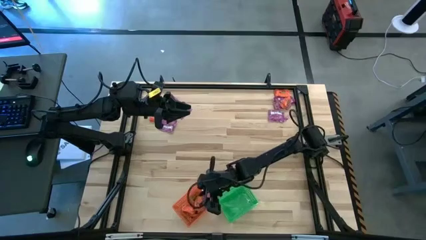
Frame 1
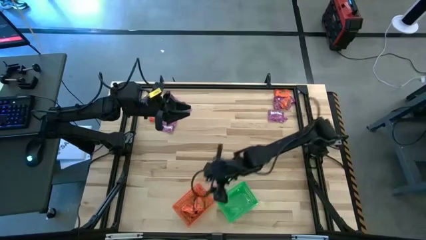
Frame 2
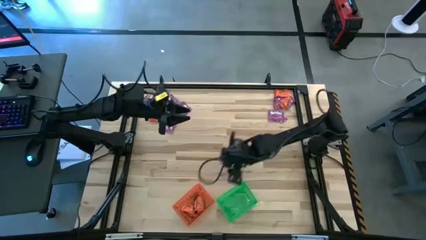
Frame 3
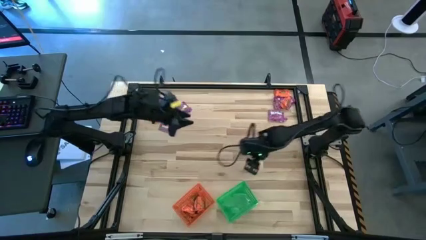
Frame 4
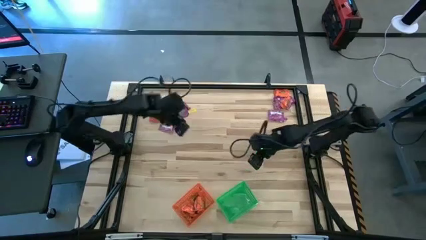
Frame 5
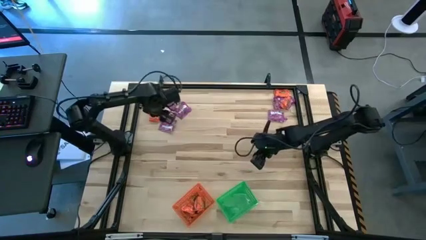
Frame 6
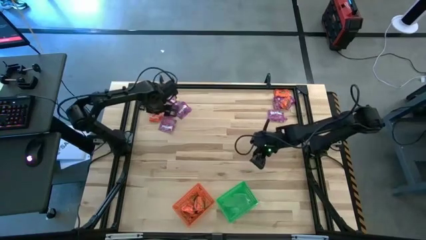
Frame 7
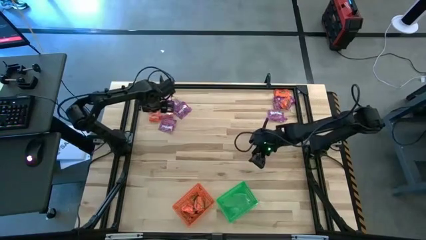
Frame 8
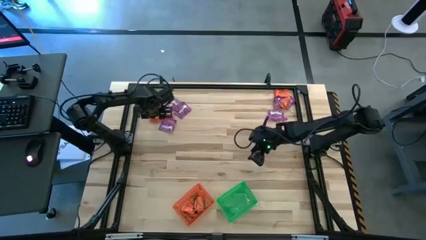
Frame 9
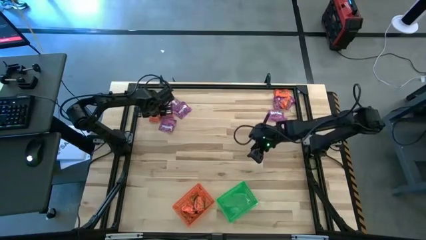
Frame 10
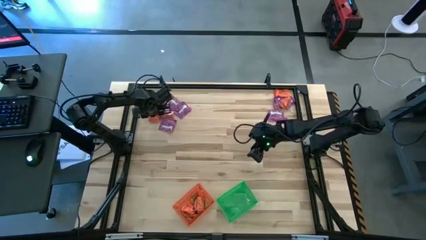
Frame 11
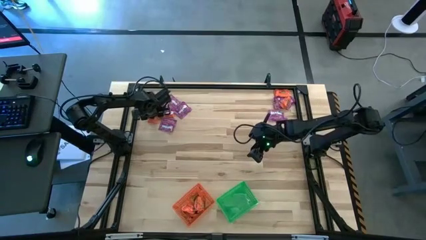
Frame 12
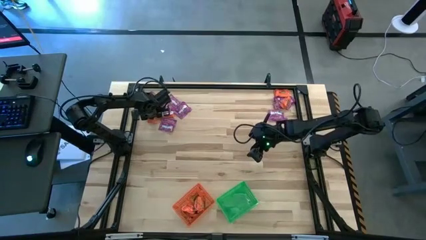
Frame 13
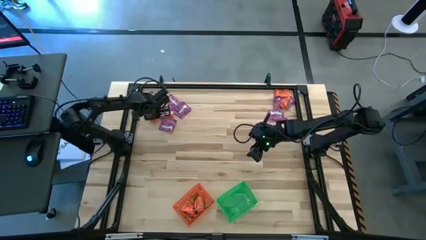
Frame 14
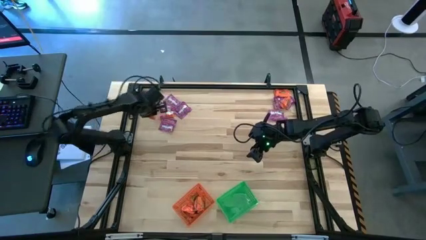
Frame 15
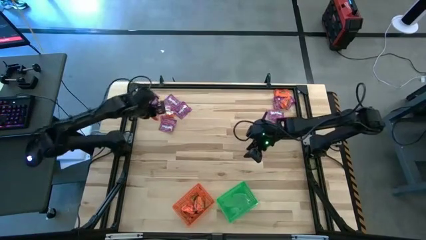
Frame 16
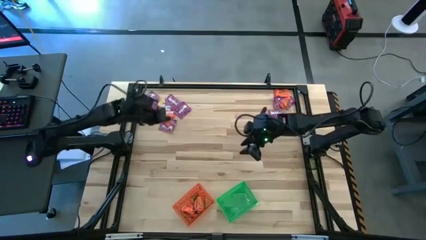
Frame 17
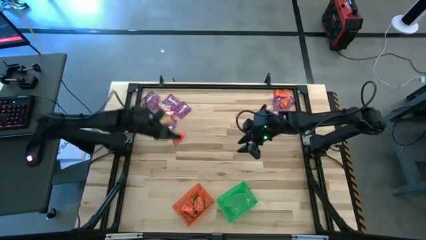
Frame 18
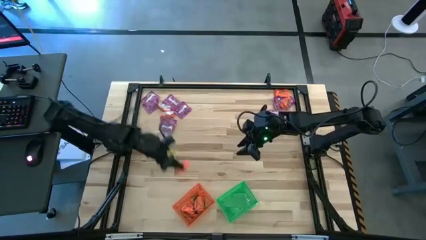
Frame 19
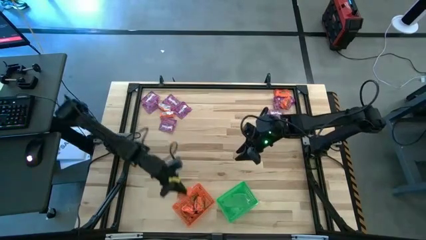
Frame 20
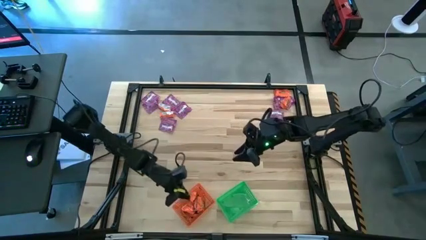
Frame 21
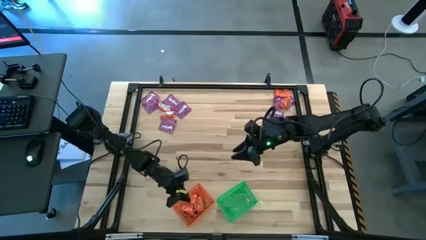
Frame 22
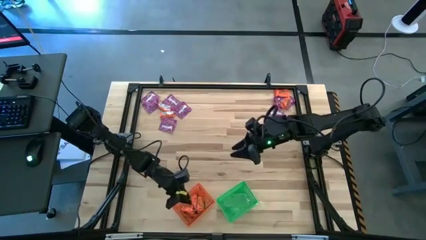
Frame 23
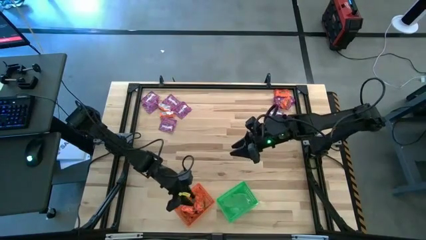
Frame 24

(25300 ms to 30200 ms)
Task: Sort candy by brand, put in halloween buckets
Put the orange candy into the orange basket

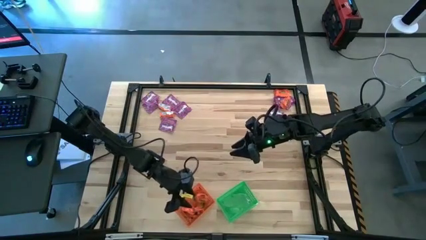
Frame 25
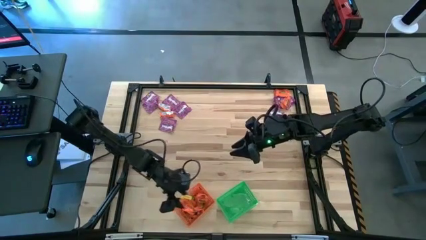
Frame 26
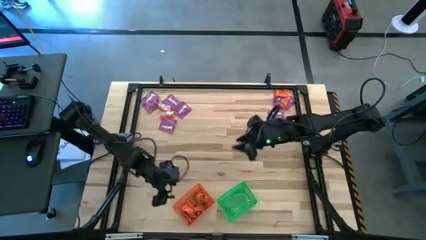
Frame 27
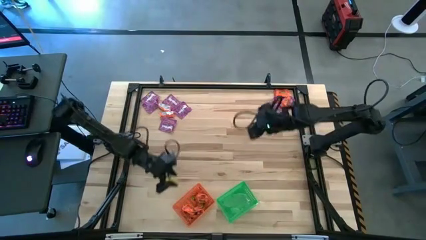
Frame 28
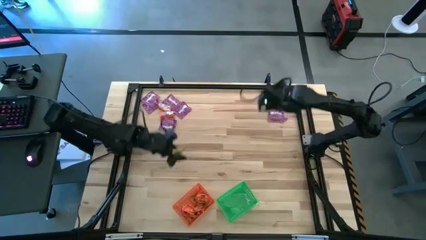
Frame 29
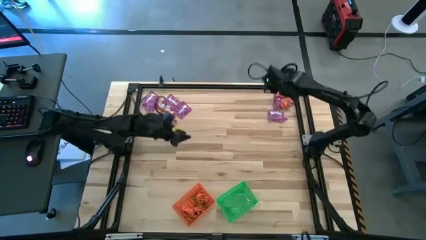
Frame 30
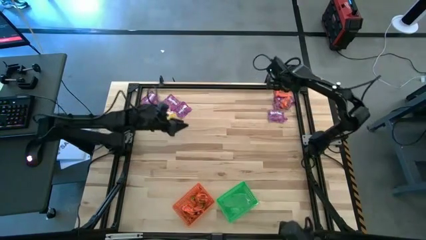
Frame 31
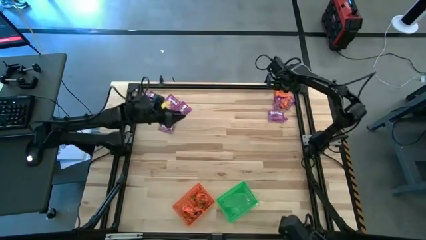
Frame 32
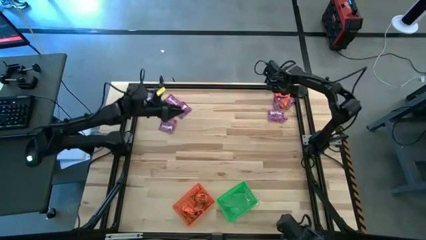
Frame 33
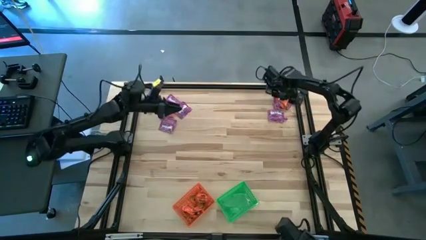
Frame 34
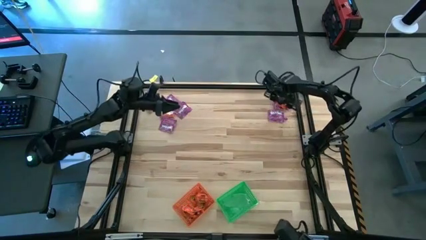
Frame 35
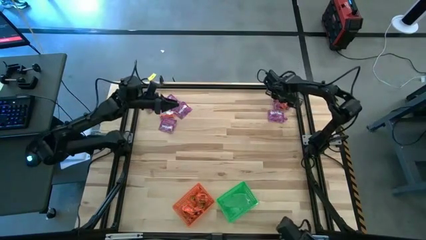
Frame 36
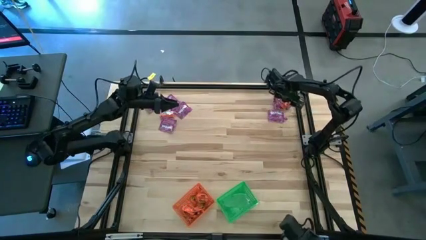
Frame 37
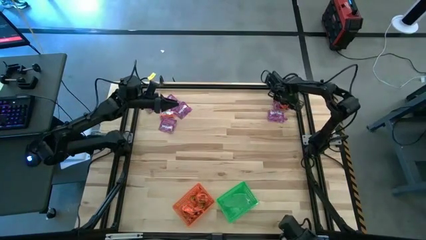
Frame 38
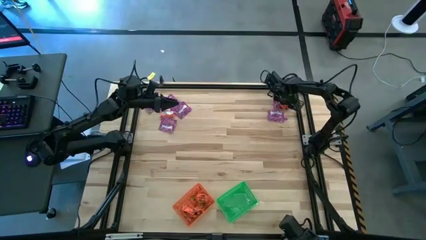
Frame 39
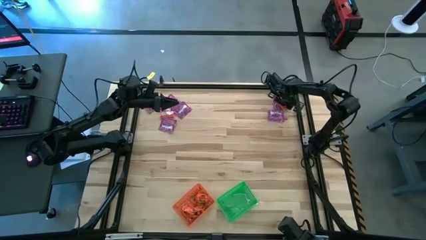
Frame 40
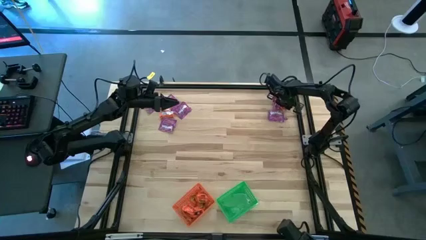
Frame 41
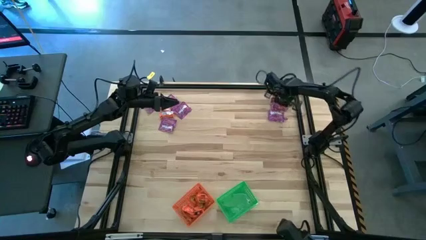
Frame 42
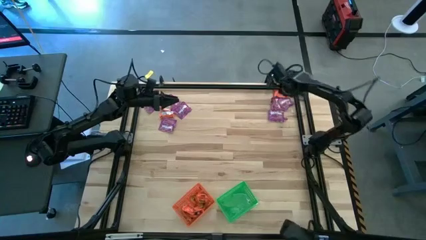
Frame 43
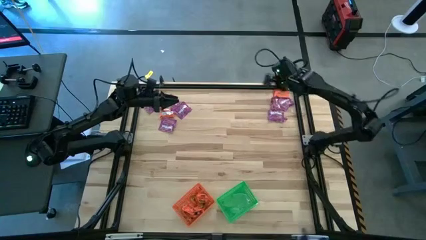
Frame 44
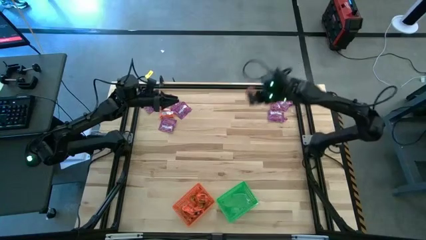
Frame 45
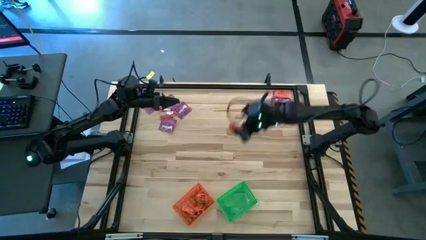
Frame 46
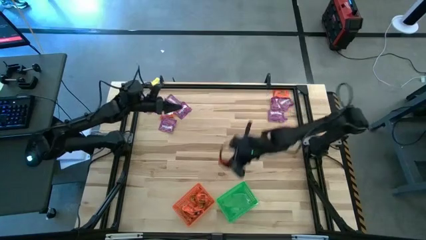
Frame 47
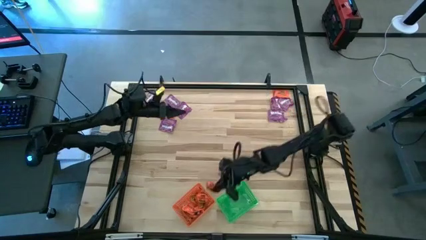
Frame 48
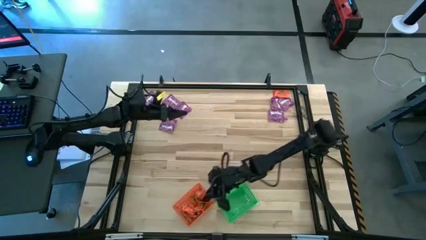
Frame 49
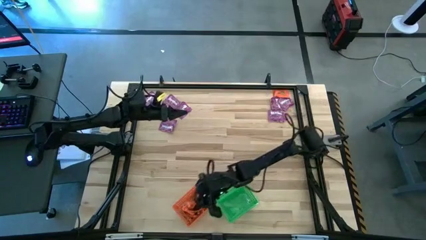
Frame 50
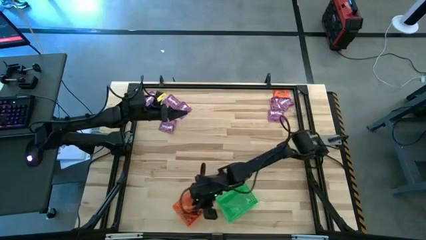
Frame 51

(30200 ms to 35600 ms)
Put the orange candy into the orange bin

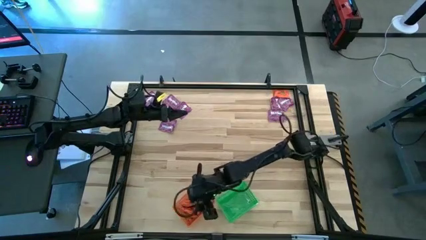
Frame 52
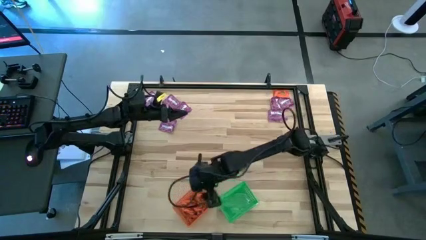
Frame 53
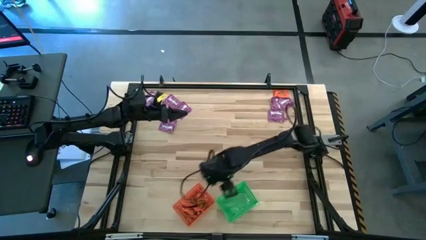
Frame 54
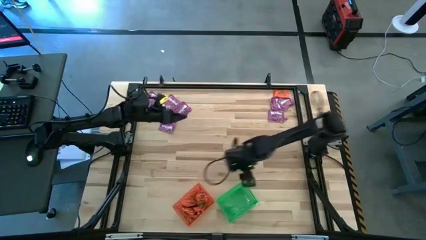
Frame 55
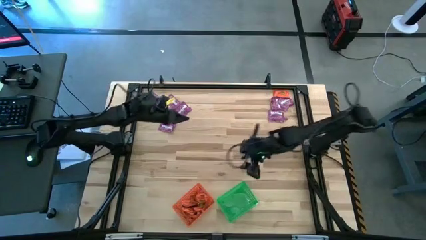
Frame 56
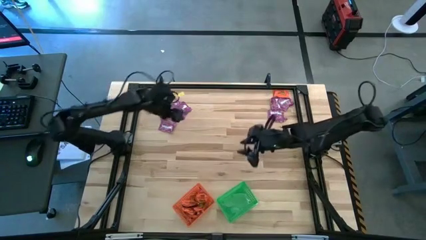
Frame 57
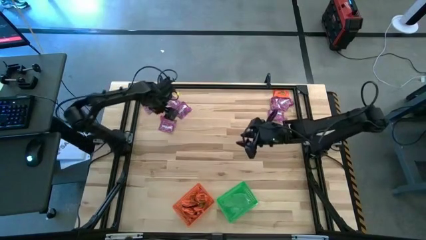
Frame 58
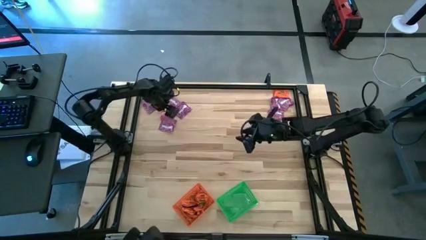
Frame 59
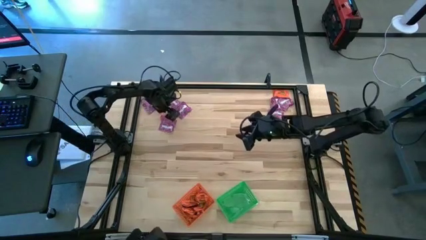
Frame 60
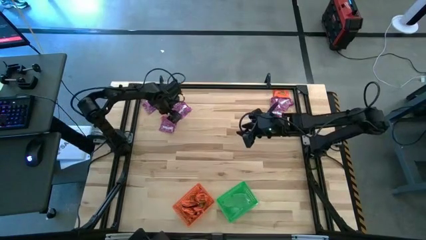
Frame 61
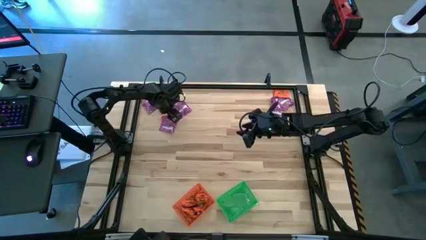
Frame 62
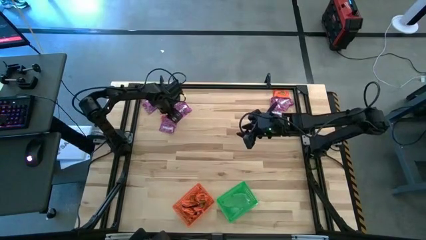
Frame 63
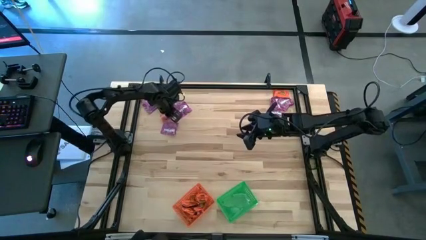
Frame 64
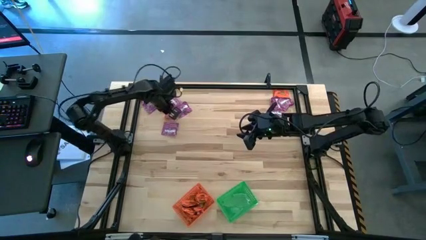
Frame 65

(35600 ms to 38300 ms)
Put the orange candy into the orange basket

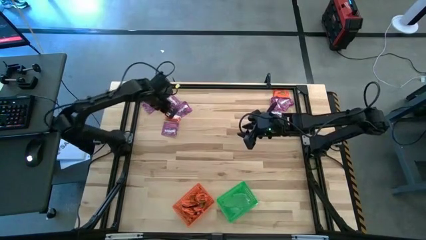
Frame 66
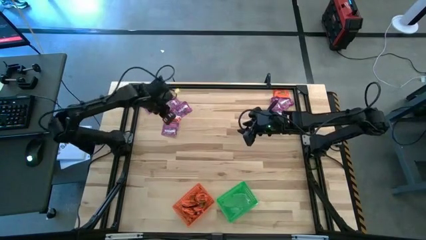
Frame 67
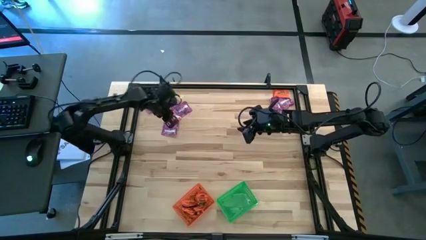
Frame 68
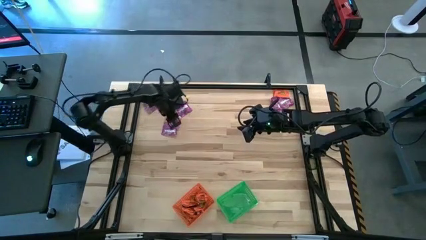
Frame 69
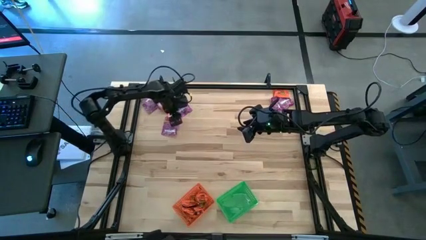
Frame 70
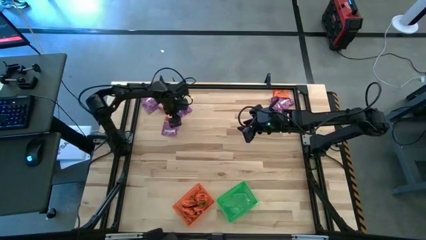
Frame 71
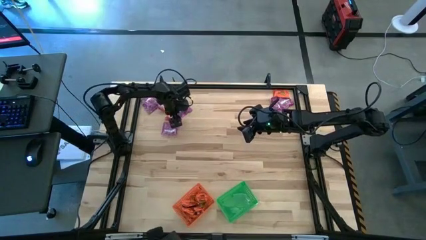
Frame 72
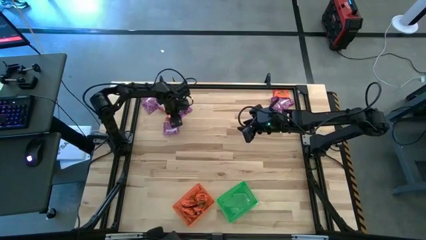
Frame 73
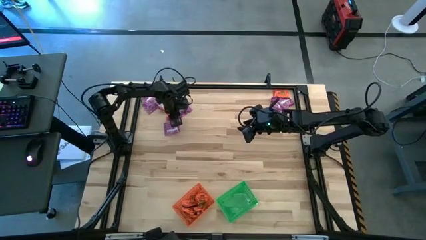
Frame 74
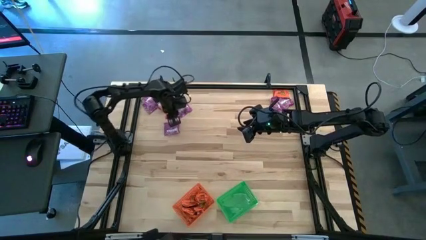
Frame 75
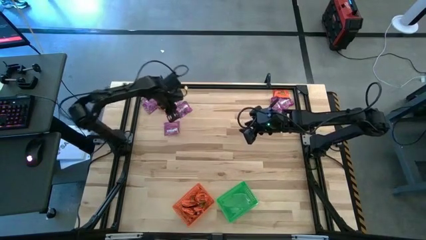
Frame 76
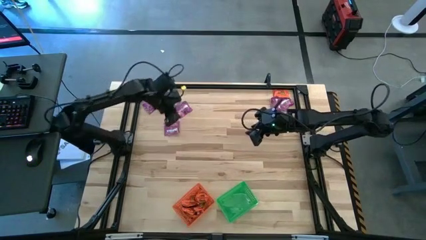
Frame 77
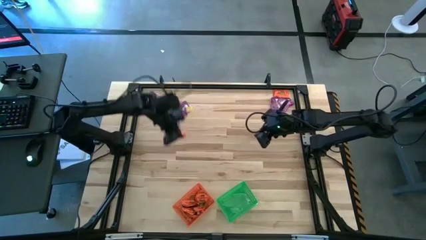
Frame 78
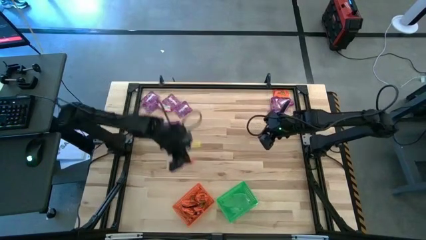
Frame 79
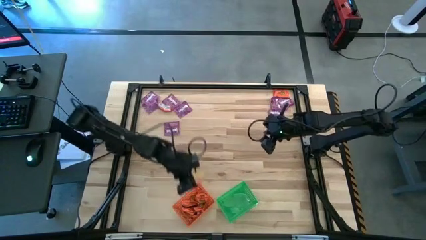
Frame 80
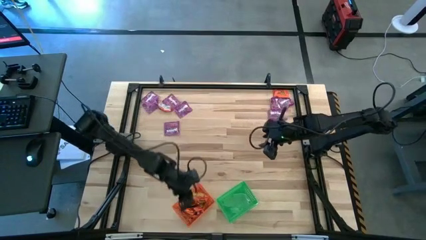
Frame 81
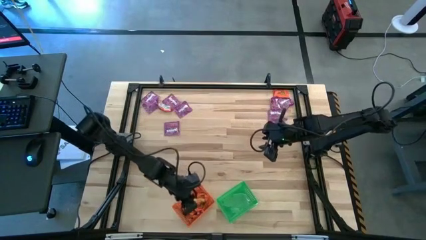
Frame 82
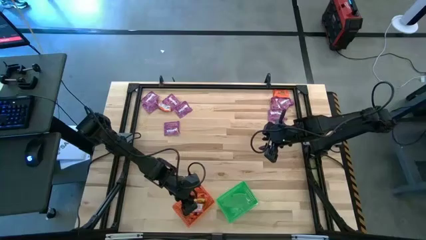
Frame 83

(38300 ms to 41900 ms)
Put the orange candy into the orange basket

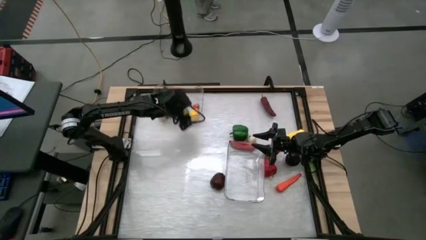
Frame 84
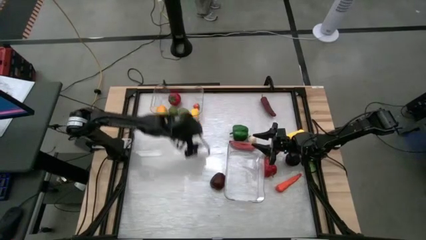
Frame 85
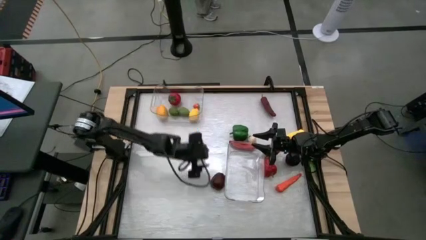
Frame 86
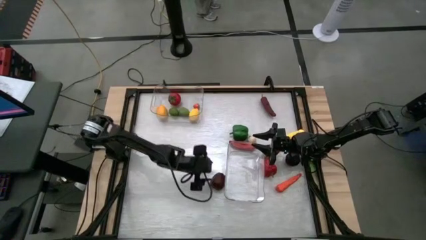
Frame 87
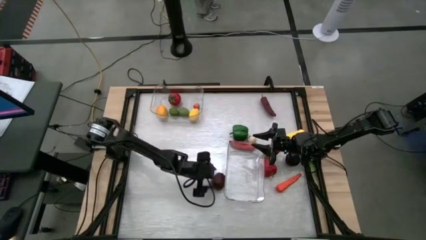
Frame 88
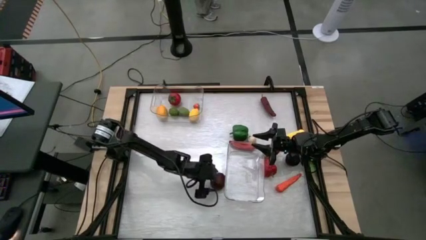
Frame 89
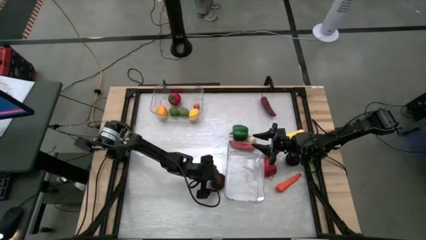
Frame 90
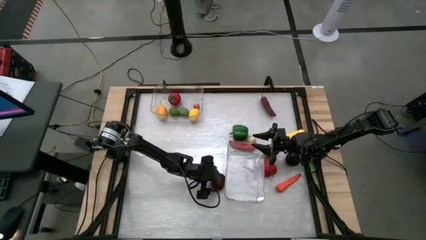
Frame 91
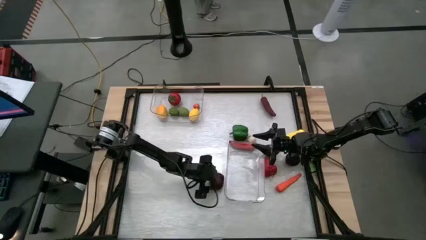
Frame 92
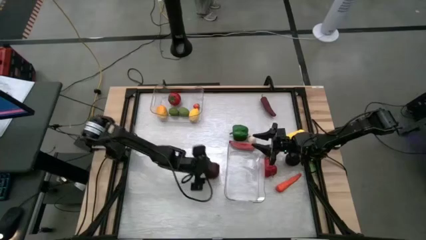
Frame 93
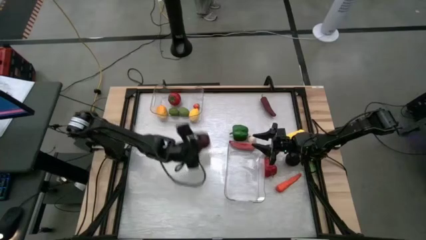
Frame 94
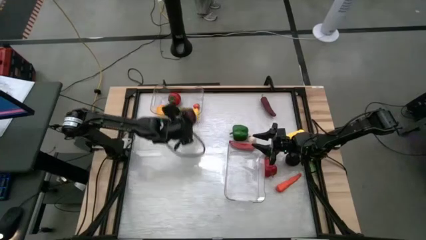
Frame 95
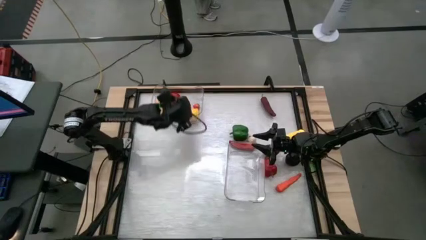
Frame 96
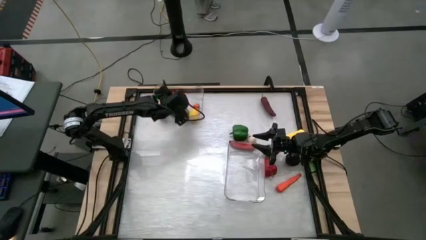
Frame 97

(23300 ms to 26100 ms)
Task: Sort produce into baskets
Put the apple into the top transparent bin
